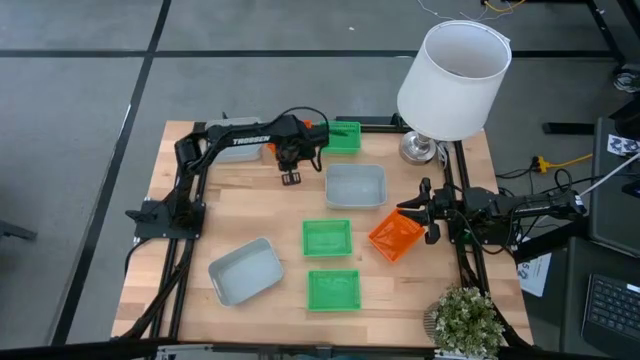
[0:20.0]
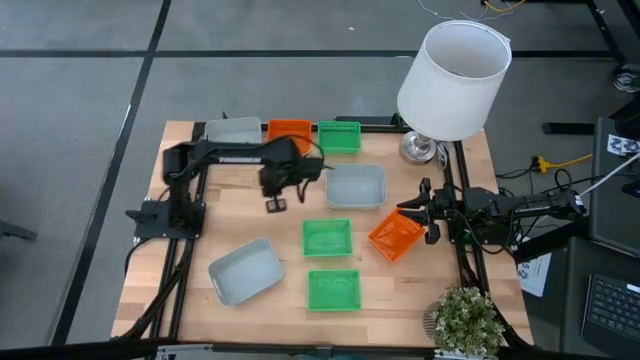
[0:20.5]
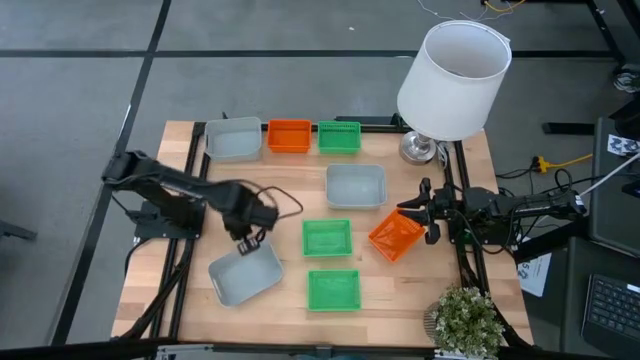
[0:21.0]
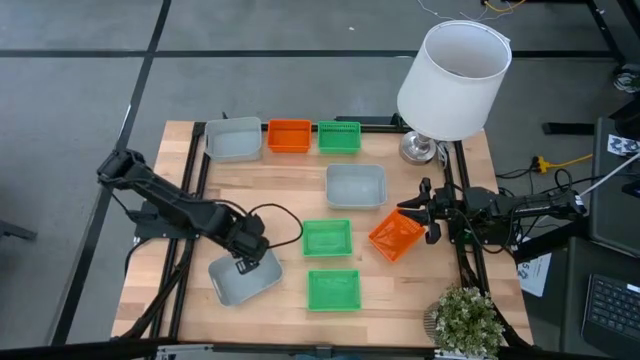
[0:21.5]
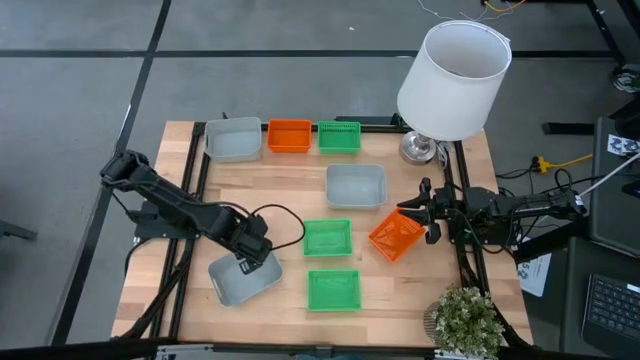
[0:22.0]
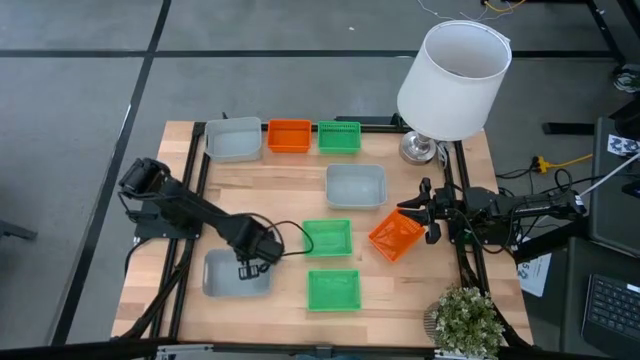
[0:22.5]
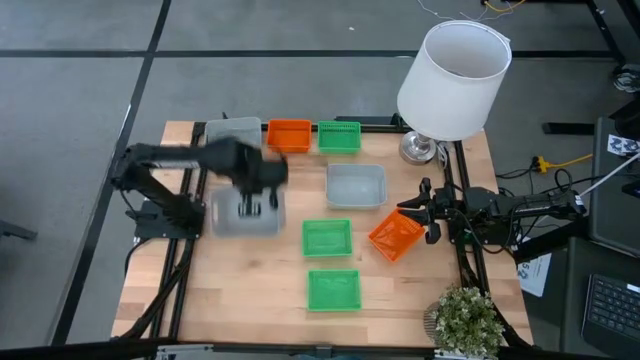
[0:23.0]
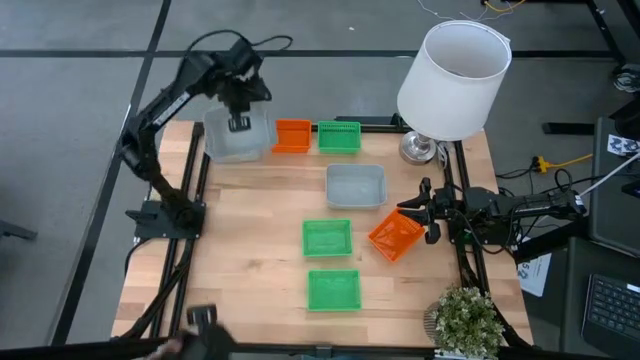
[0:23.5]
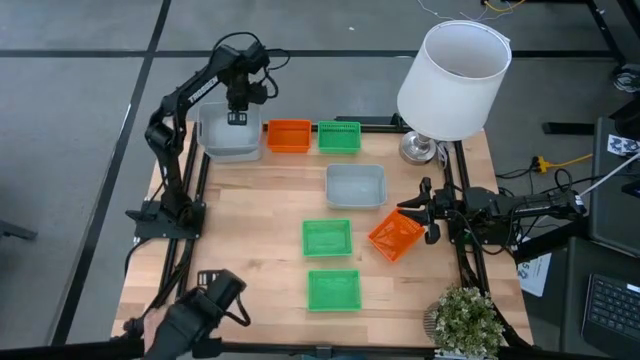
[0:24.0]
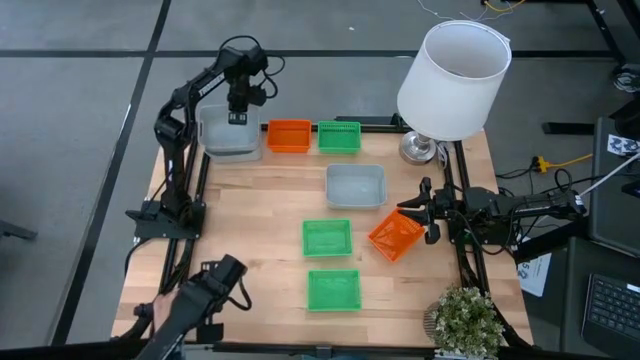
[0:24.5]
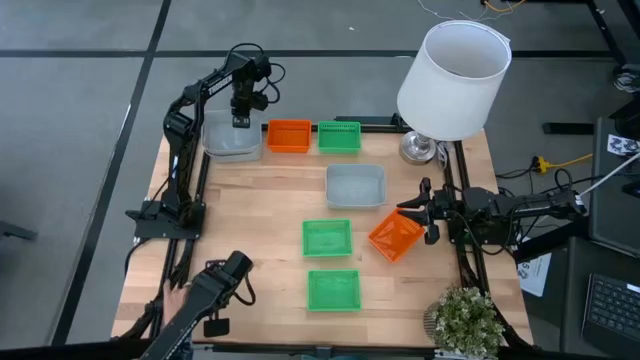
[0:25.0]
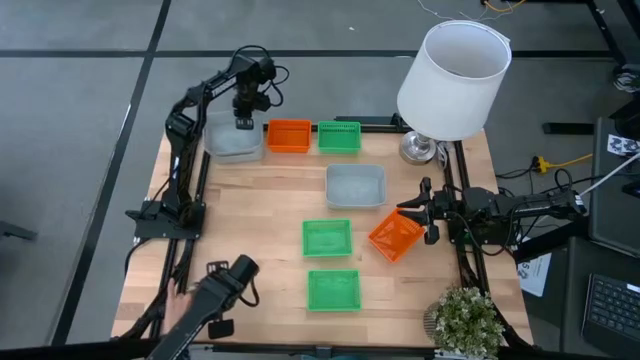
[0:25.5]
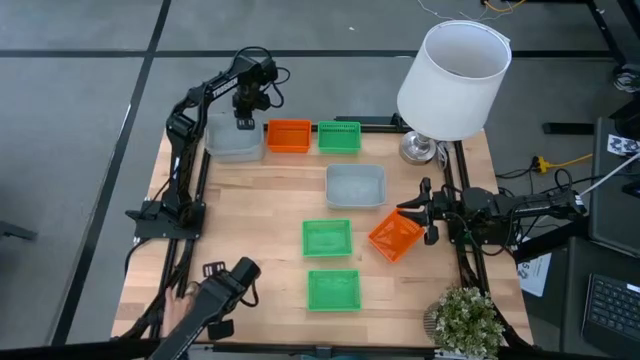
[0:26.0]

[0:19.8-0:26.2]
Stack the bottom left gray bin on the top gray bin

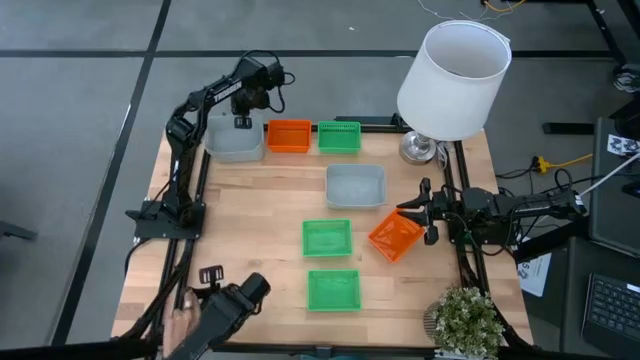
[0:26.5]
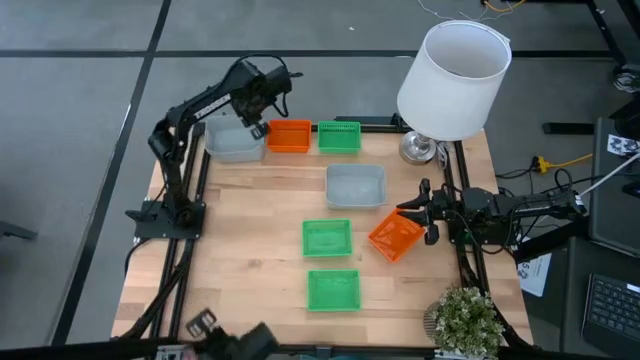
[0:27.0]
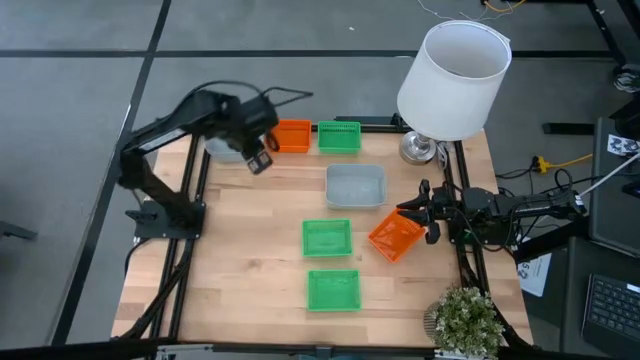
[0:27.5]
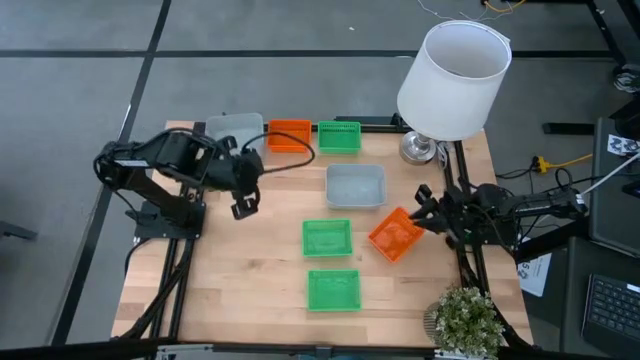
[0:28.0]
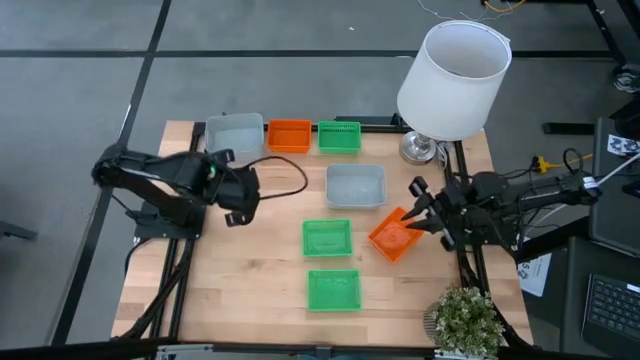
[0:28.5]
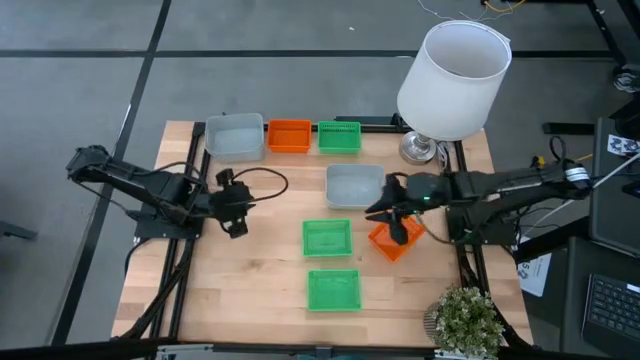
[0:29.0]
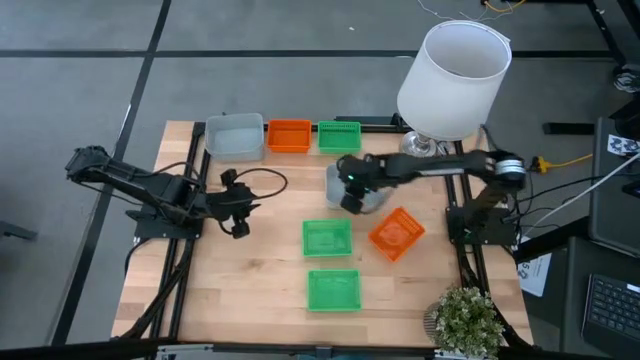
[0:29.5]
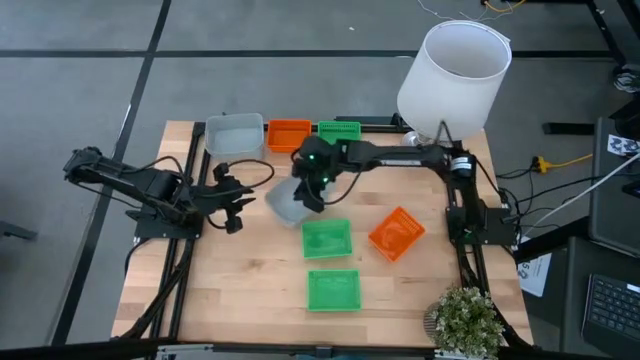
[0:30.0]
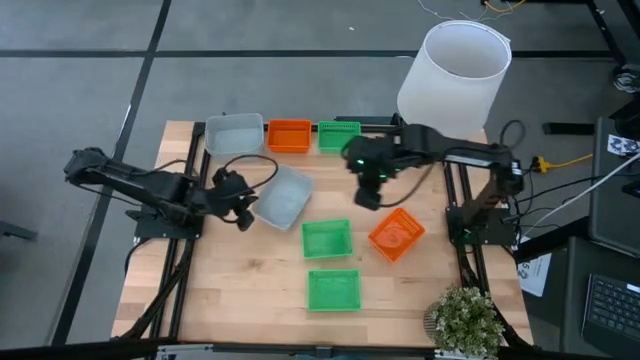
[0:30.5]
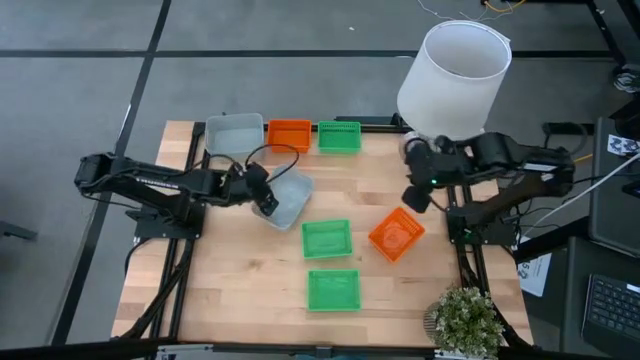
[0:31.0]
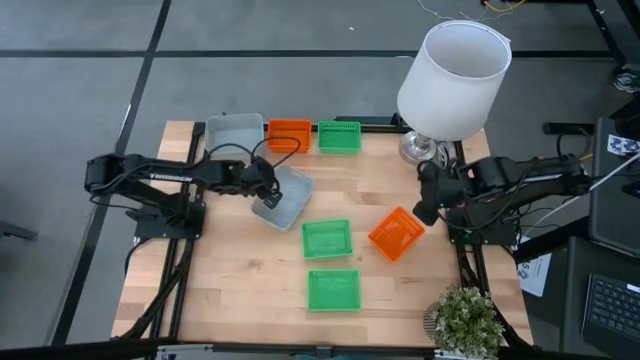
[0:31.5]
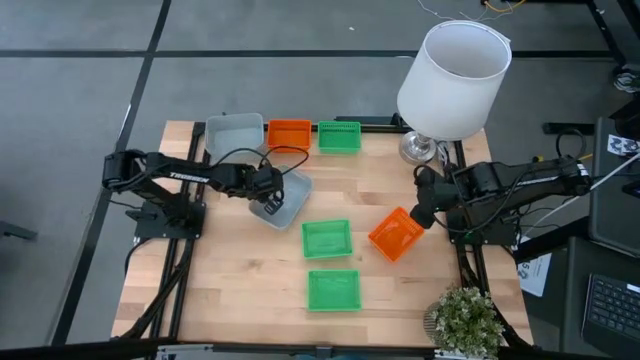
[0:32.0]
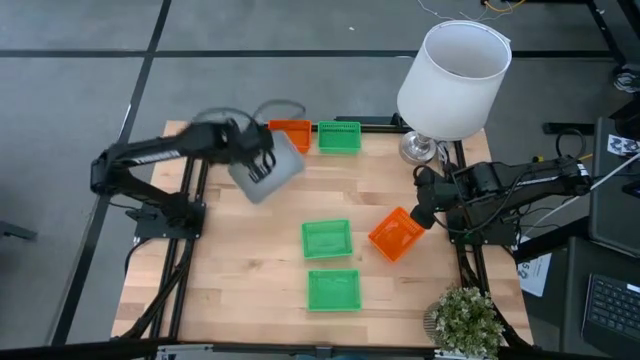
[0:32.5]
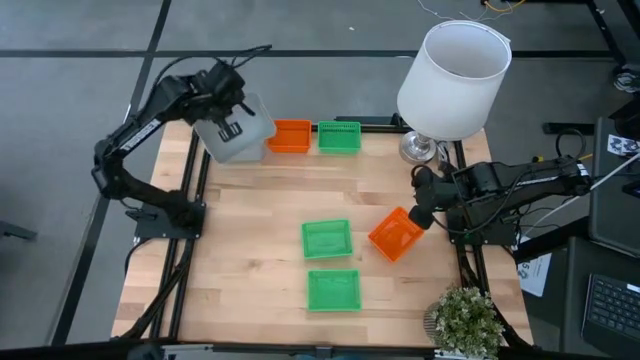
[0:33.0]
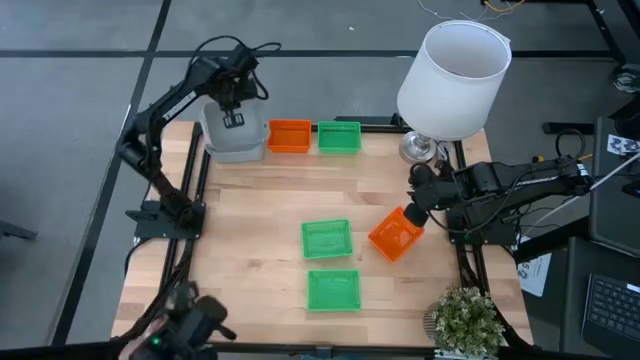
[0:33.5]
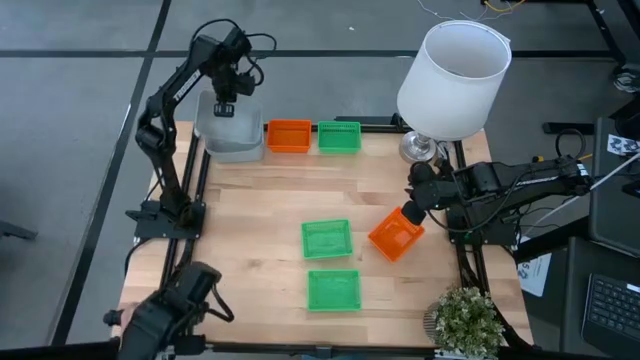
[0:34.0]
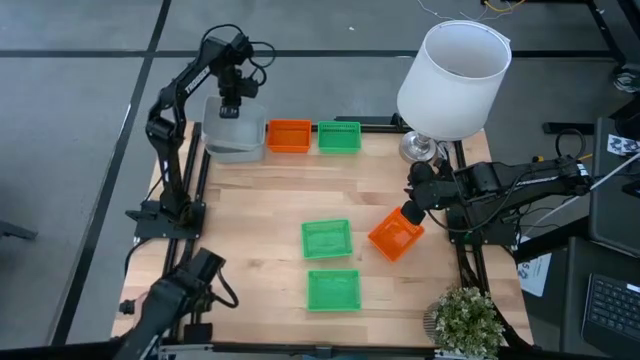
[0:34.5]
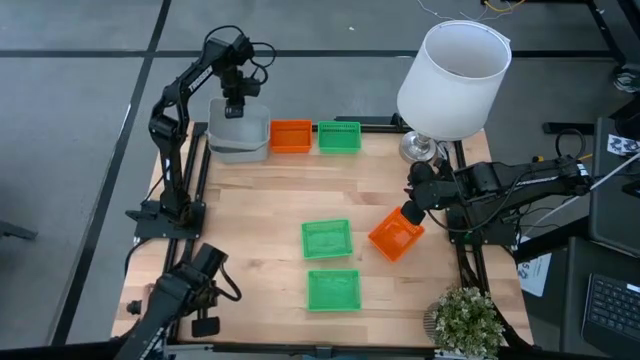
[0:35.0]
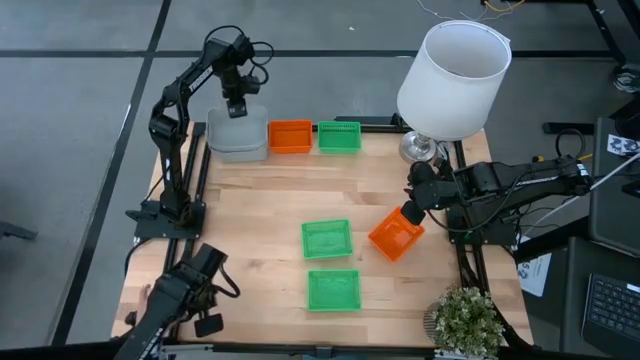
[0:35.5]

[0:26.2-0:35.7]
Stack the bottom gray bin on the top gray bin
